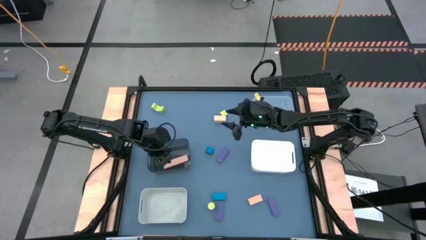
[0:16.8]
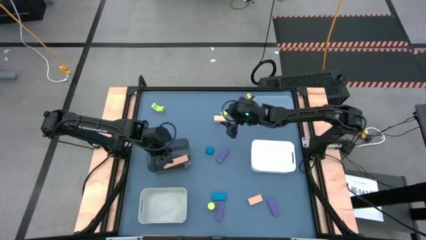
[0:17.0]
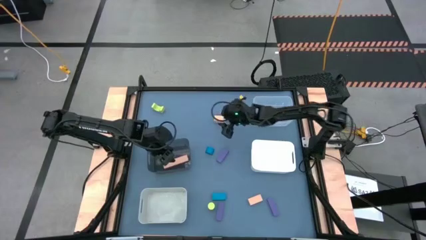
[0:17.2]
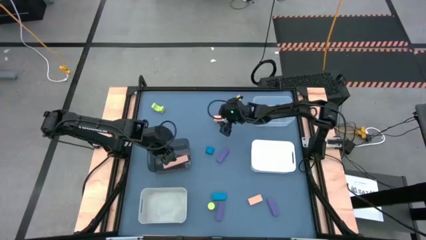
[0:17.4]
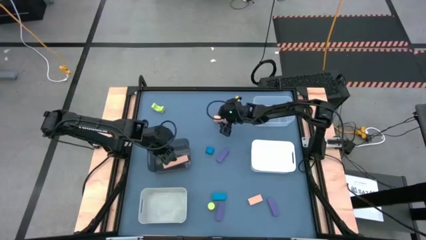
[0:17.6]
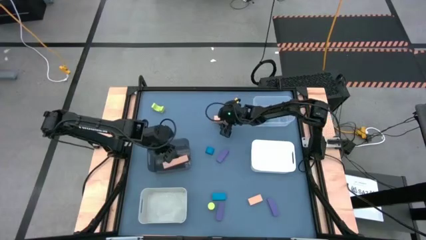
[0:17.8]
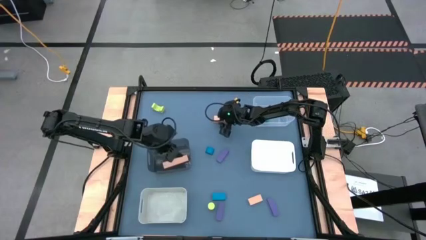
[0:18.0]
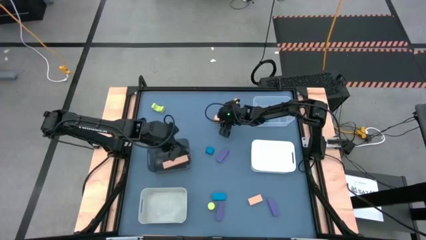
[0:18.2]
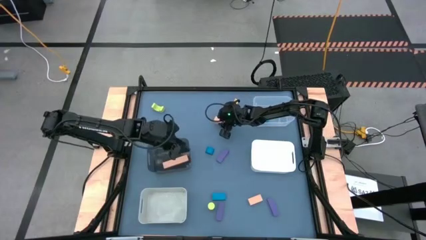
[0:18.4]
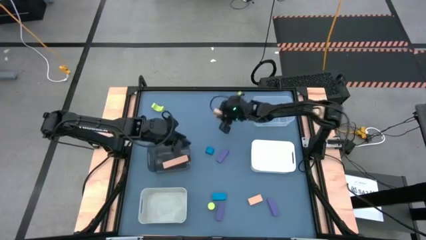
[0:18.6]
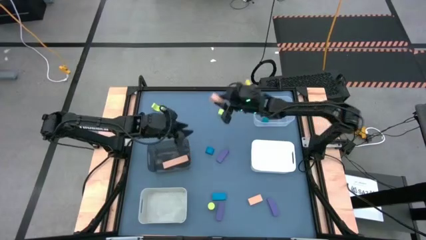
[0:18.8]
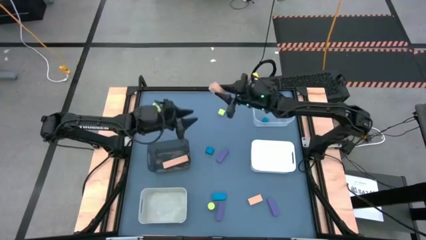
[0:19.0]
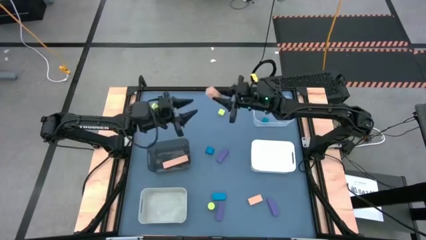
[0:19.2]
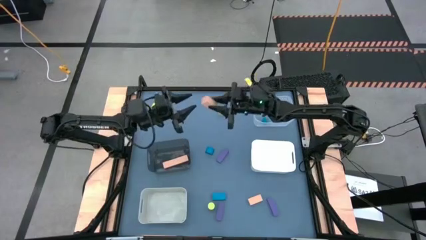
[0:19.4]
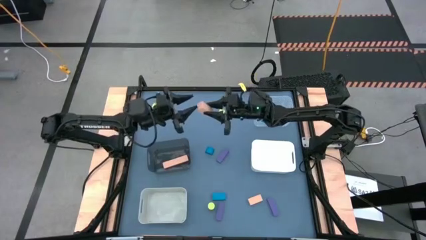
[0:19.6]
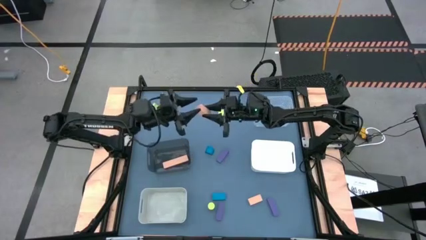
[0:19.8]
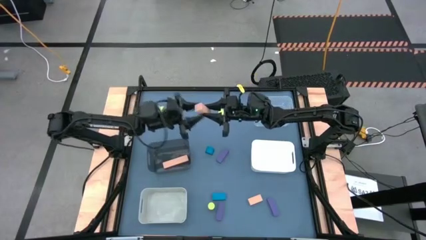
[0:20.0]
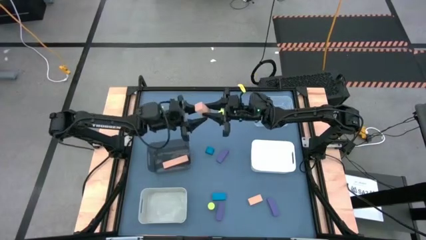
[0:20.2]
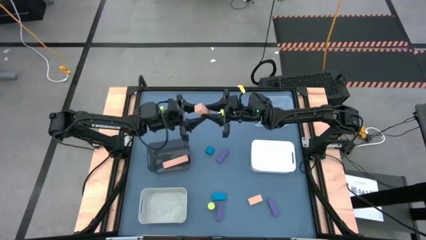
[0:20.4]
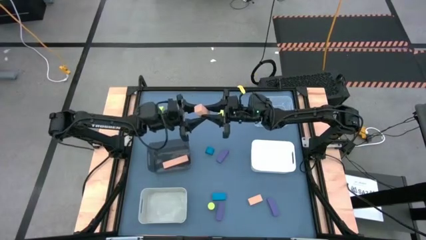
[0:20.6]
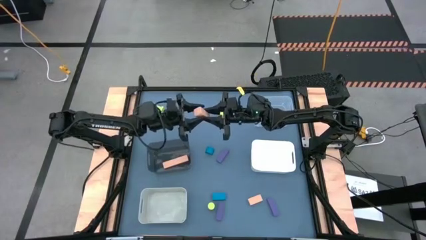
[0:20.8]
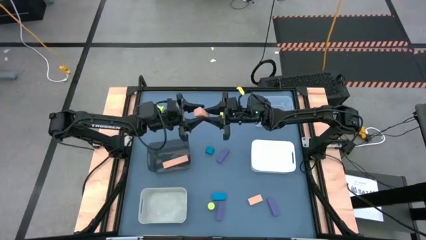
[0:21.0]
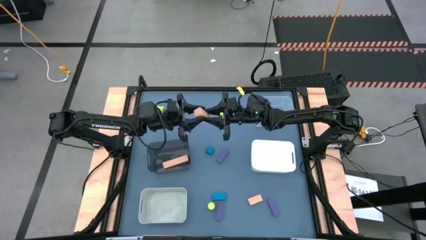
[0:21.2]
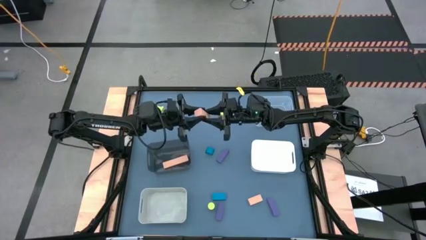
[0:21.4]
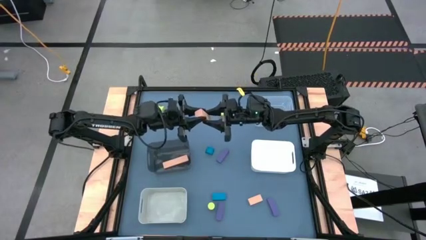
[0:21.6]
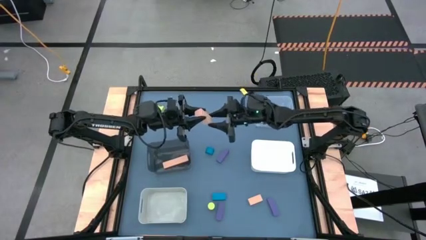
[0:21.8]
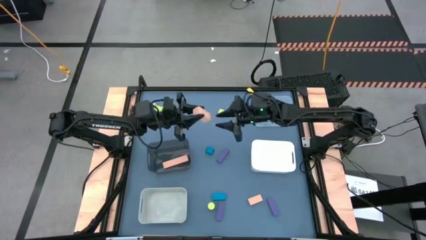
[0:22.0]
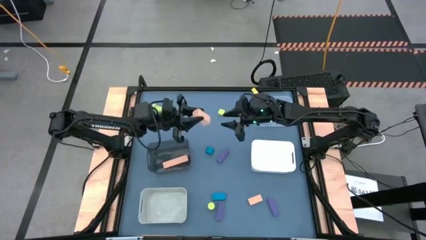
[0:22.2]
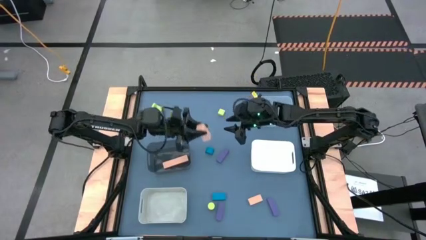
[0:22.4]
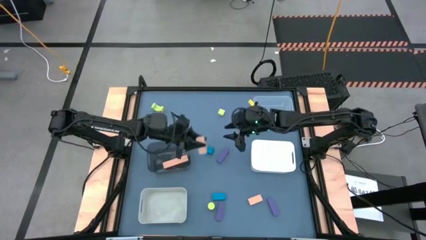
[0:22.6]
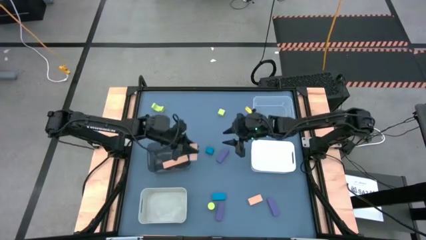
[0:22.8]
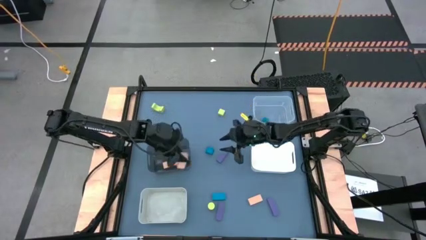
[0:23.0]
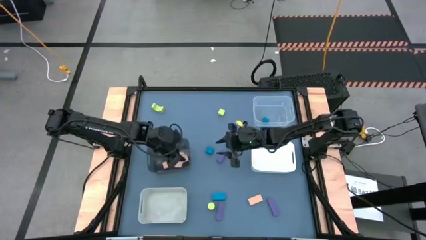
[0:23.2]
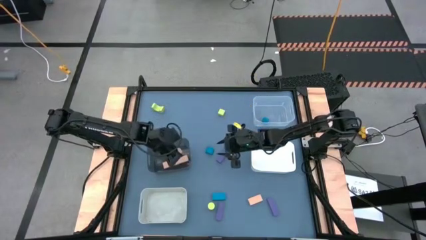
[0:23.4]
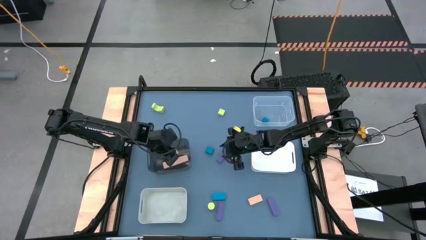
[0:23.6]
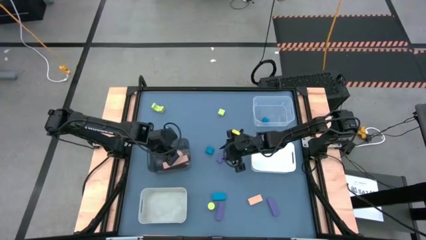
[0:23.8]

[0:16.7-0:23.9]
Task: Sort & place blocks by color
Put the top orange block into the black bin

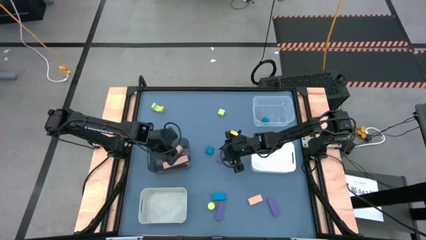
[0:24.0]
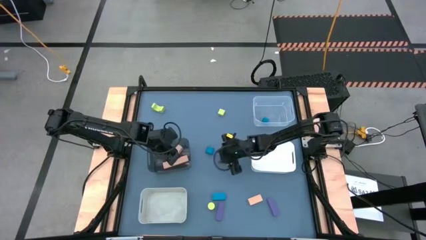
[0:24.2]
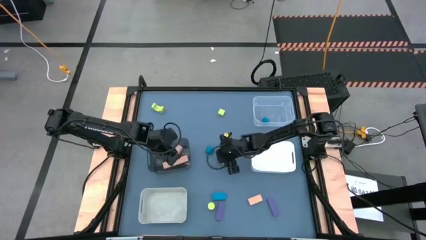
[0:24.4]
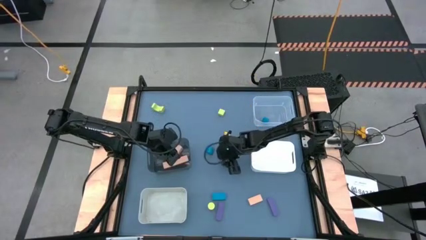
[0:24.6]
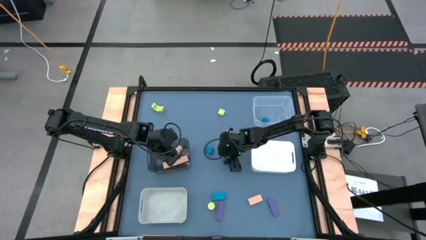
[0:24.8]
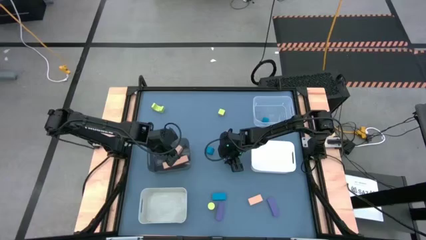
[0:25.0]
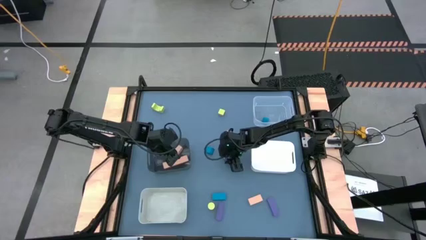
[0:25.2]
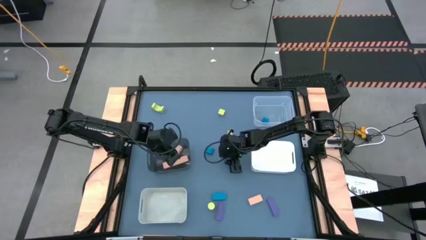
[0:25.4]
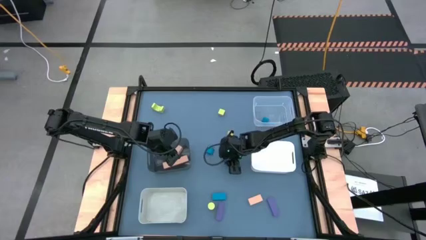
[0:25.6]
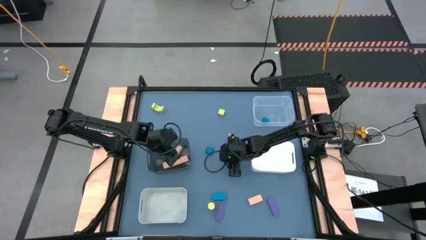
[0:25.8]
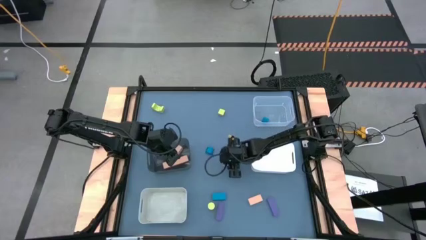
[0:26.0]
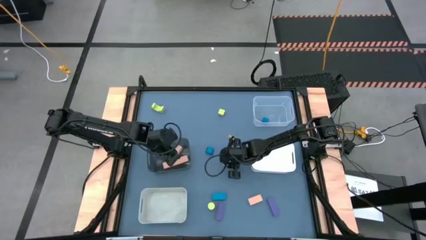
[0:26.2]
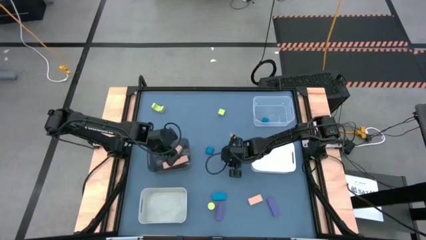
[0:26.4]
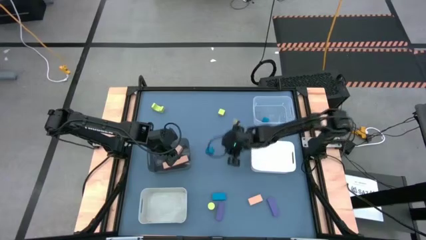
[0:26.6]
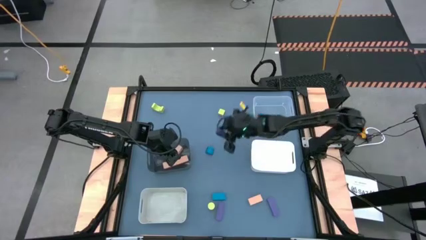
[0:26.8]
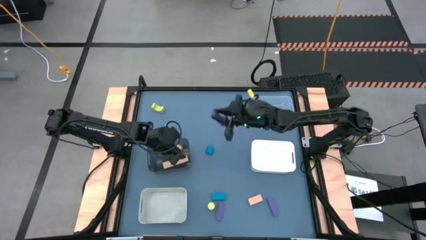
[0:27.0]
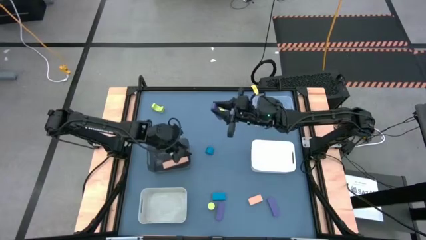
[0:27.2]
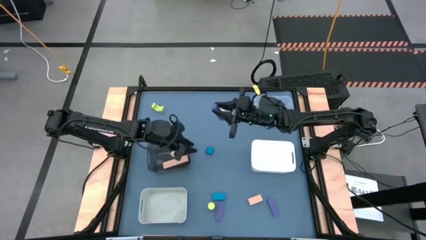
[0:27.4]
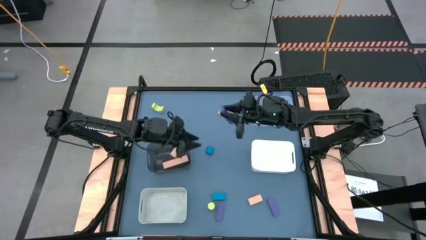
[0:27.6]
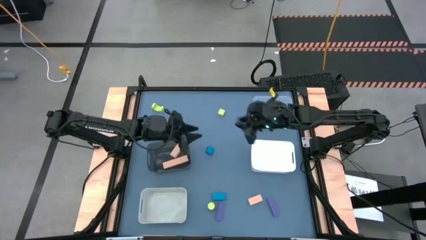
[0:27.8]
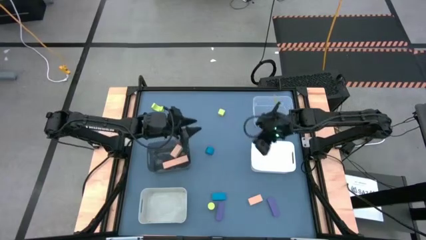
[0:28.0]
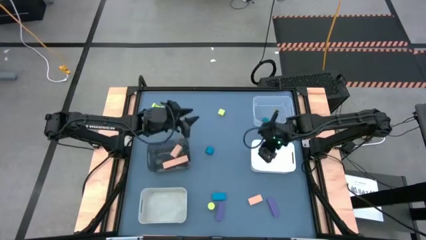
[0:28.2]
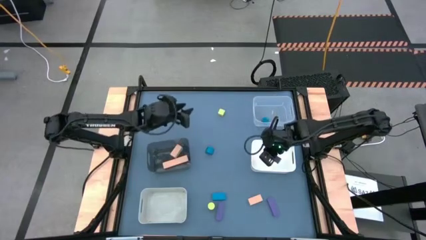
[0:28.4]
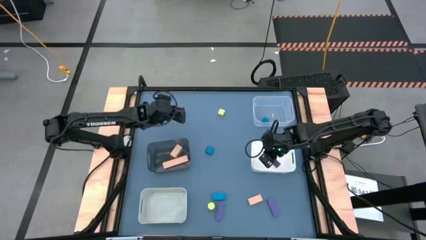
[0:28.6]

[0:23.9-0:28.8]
Put the top purple block into the white bin

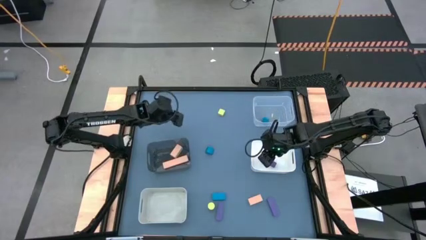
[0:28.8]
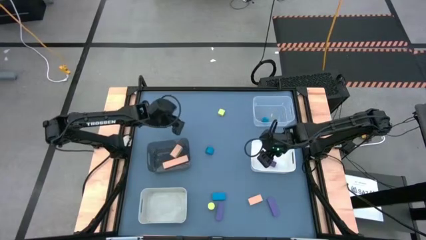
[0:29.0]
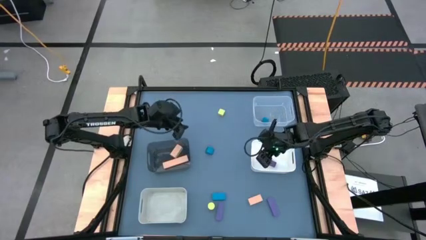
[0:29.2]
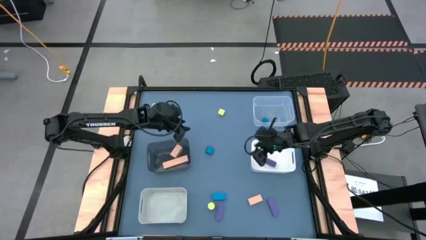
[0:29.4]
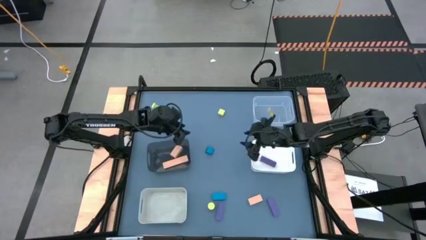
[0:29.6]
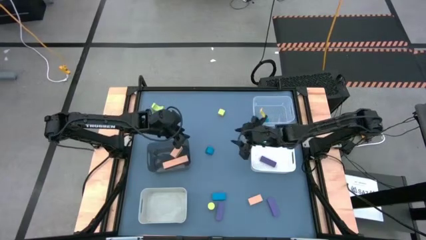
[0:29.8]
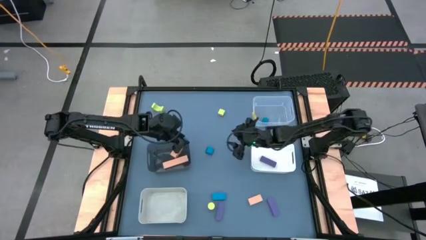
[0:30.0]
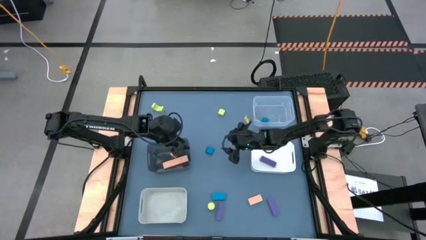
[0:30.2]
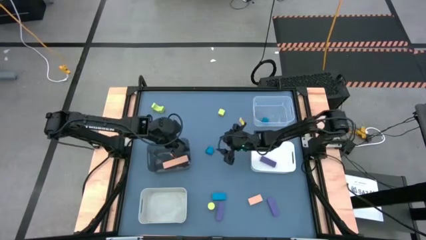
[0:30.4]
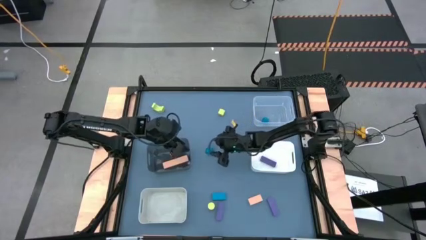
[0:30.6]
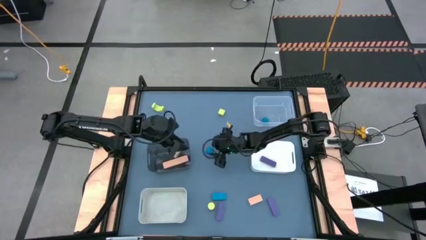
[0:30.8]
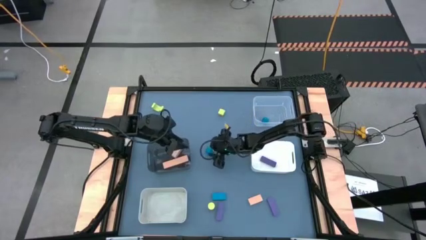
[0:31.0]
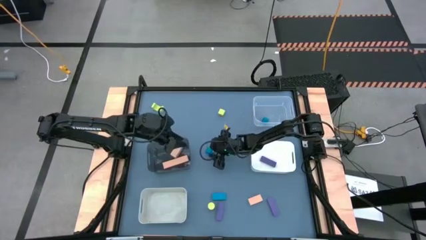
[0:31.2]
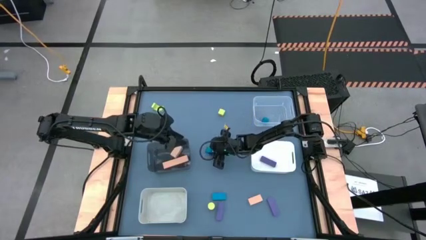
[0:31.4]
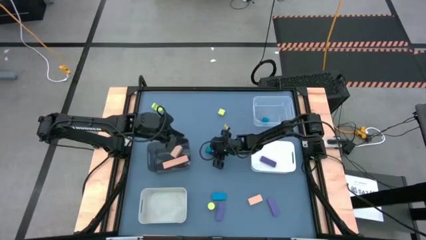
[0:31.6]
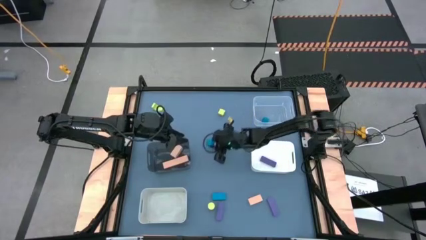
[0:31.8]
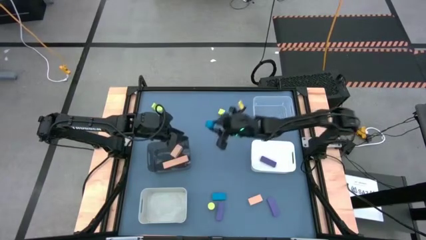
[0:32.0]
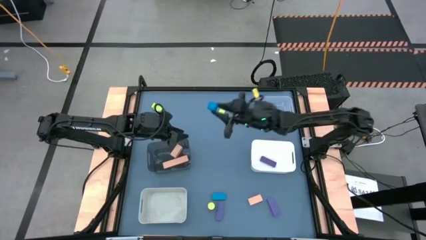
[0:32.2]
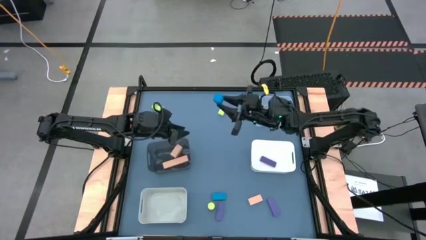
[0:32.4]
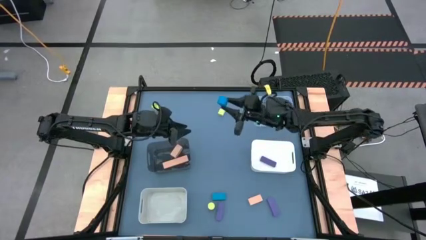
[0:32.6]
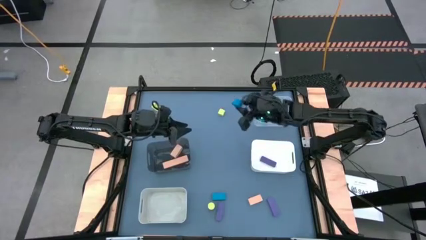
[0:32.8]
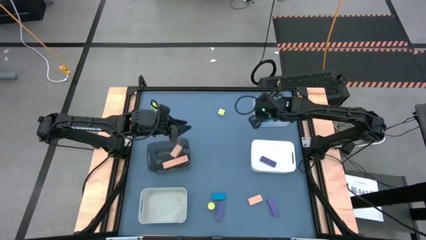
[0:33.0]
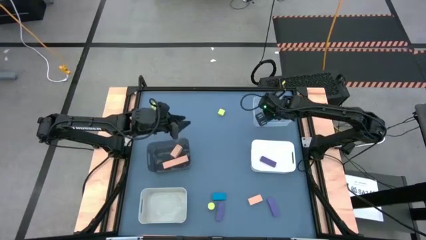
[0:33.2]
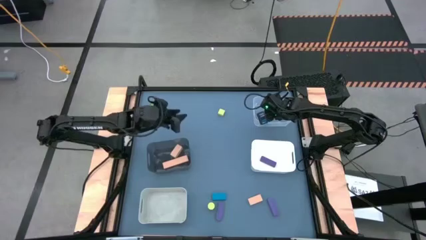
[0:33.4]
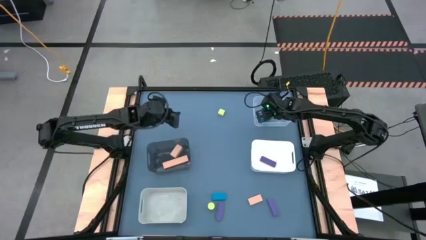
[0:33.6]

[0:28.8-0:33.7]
Put the top blue block in the transparent bin
